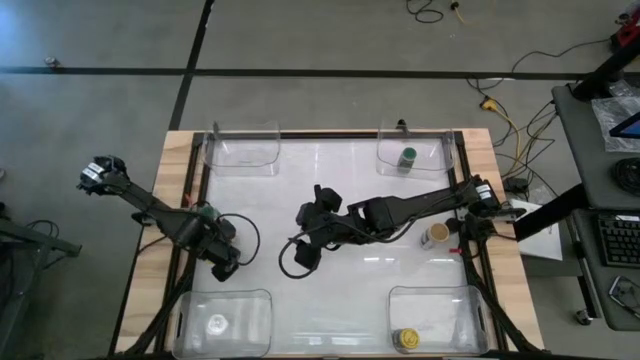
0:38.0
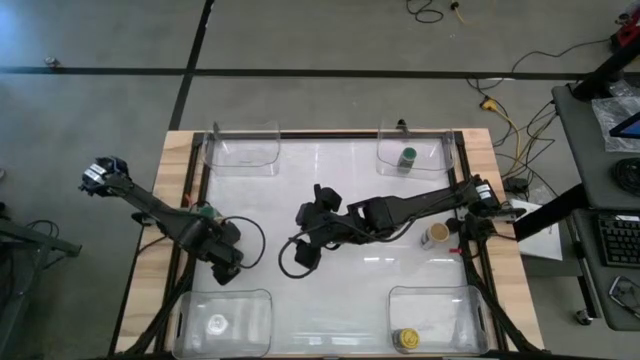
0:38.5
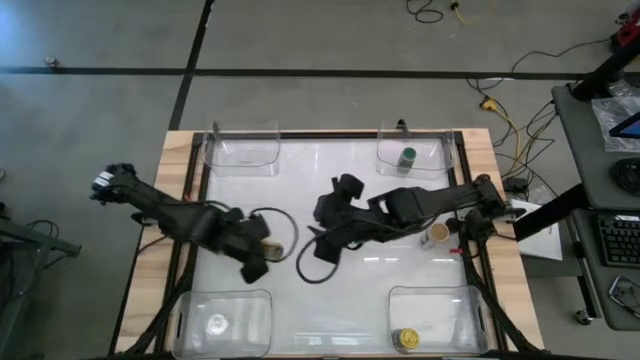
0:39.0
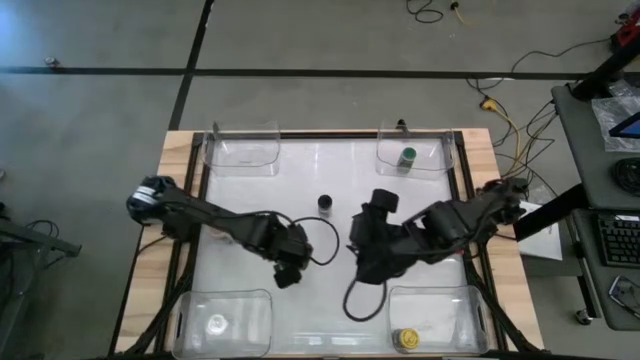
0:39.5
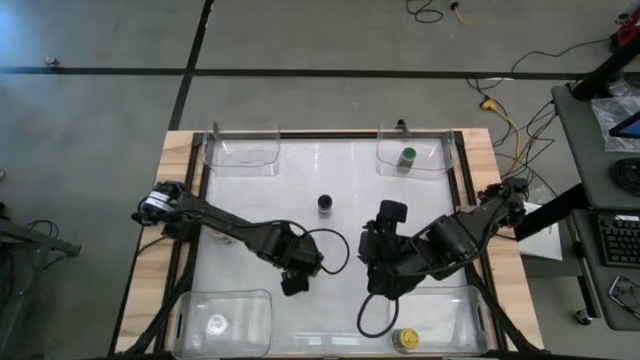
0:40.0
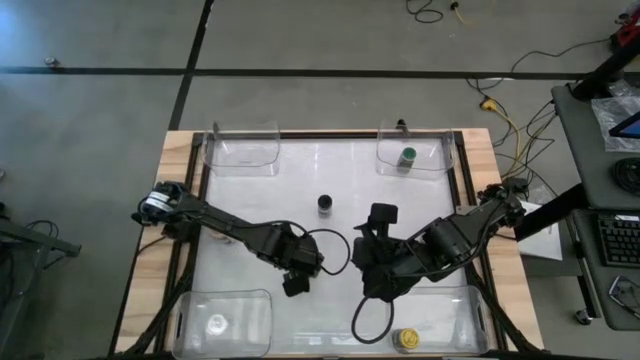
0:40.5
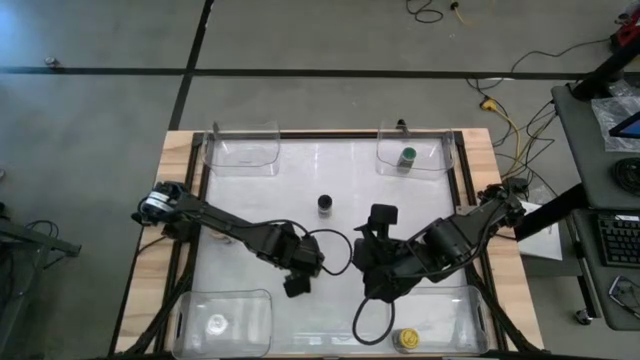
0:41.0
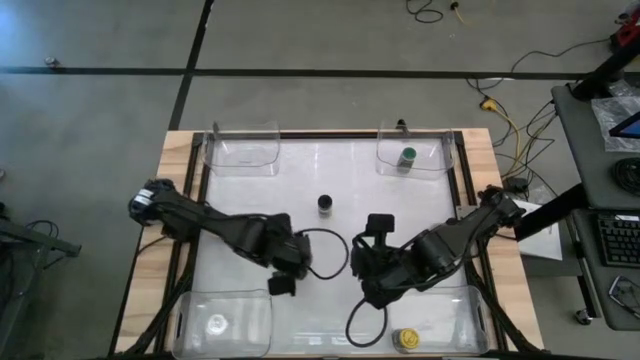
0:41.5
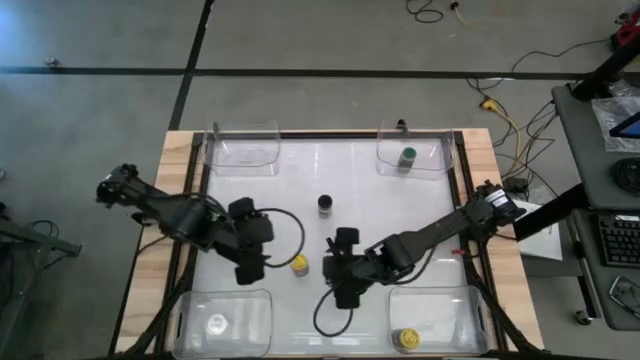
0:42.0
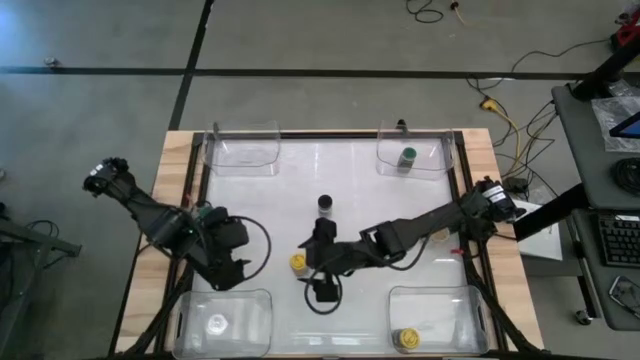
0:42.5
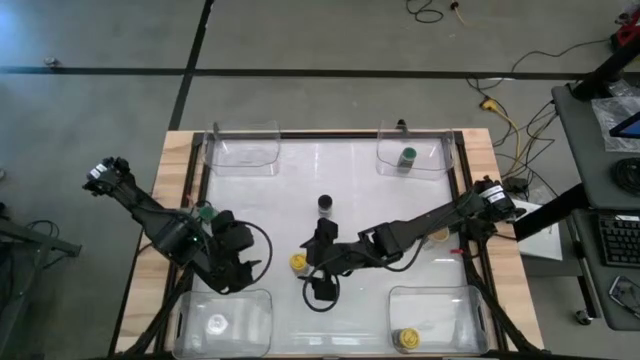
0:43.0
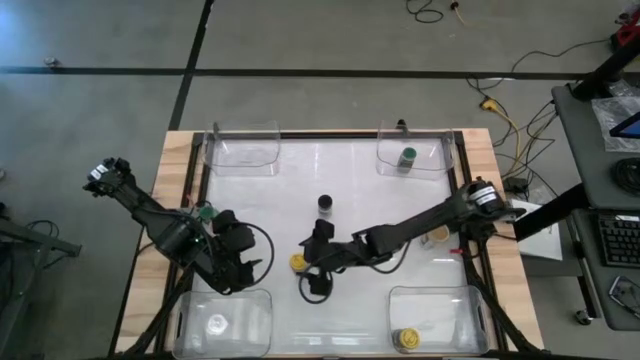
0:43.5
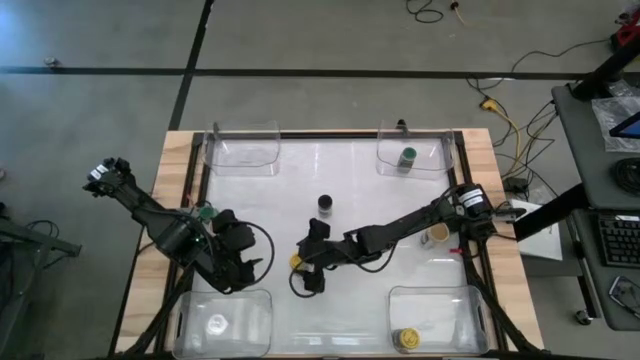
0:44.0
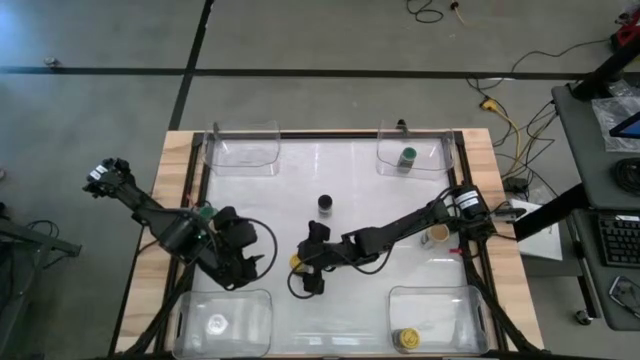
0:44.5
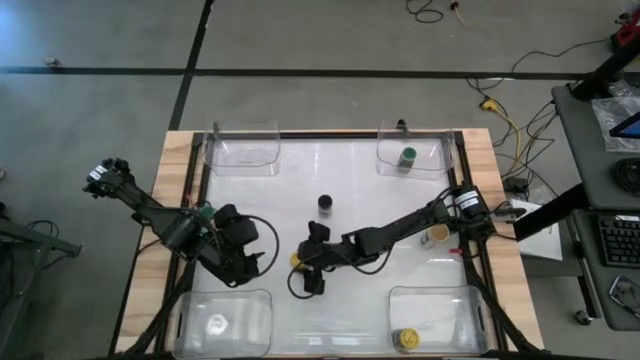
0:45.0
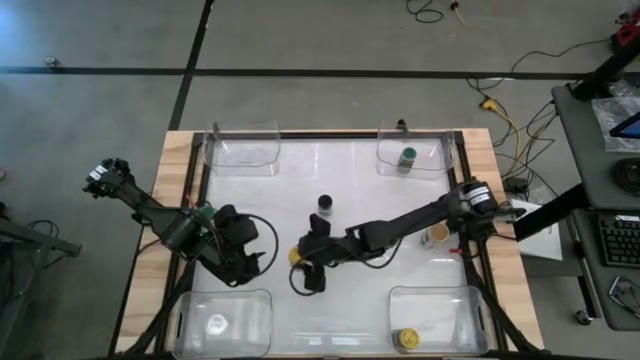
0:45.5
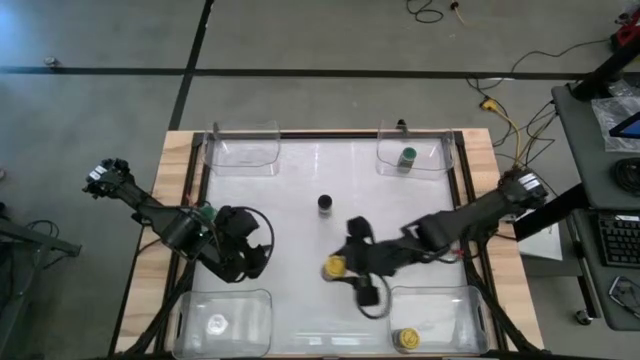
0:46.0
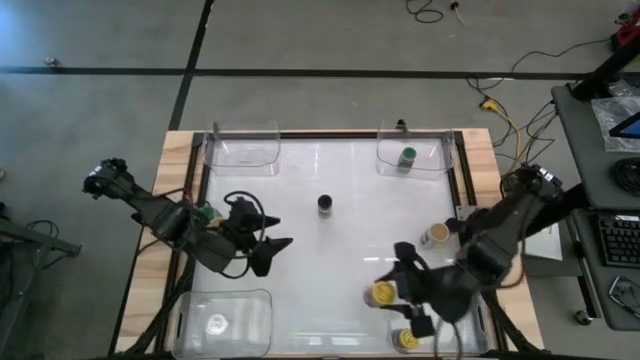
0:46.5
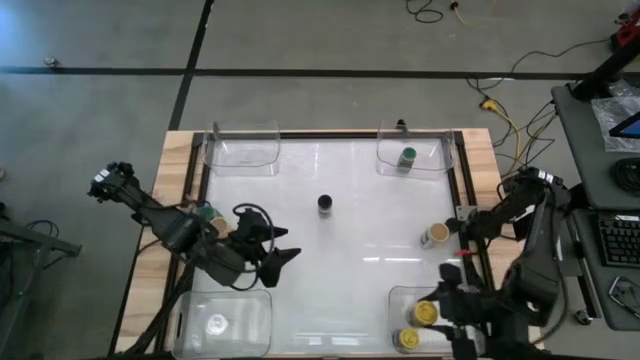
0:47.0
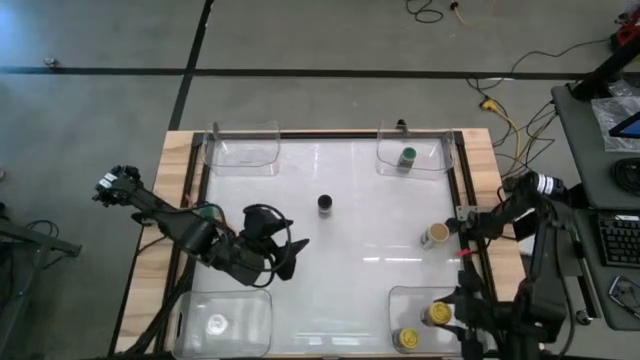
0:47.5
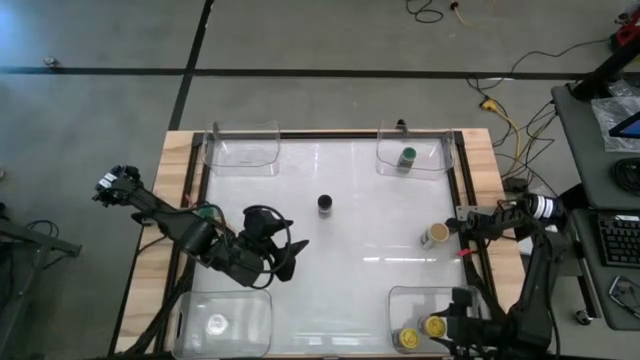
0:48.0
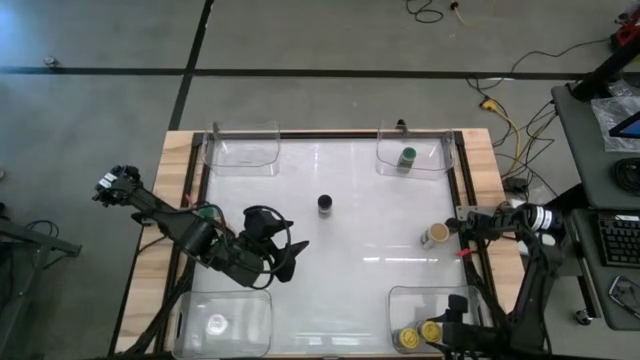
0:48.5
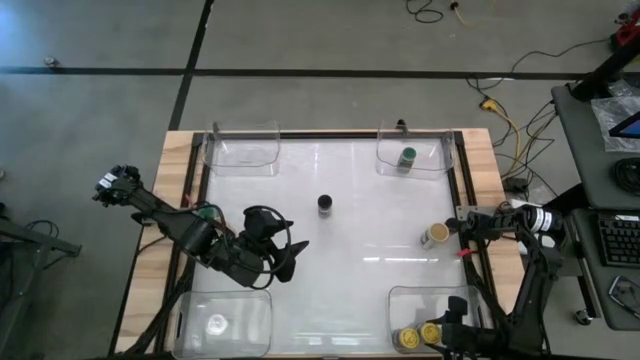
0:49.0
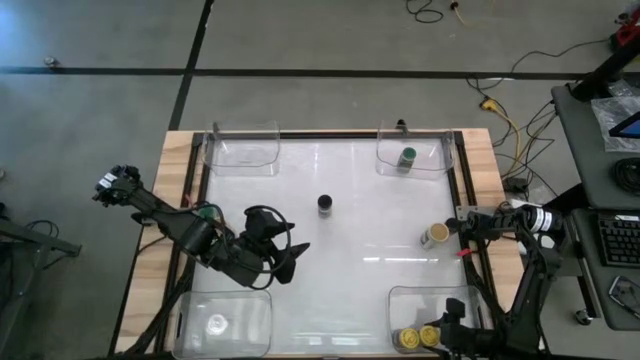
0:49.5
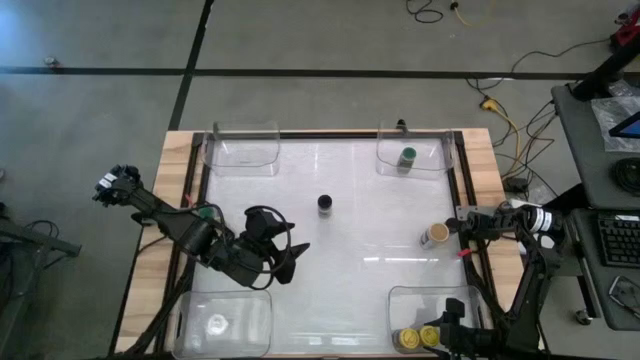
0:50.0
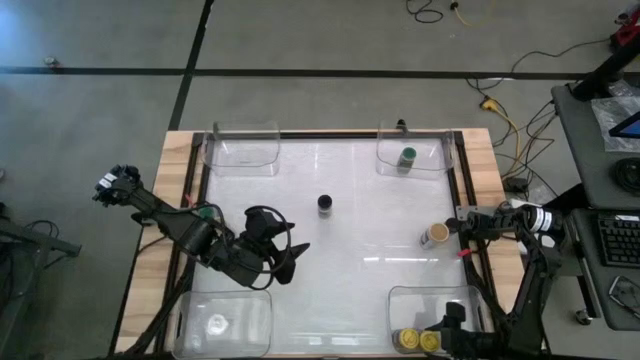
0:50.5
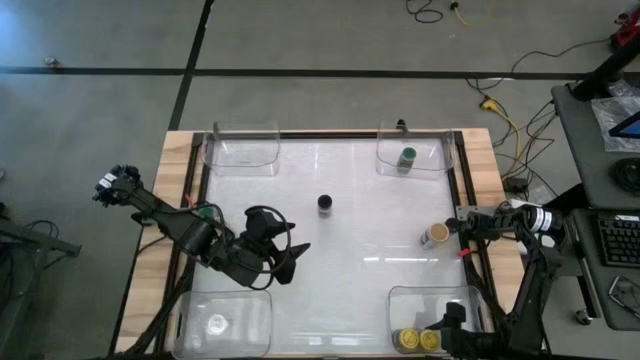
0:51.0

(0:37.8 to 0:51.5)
Task: Sort spices by type
Put the yellow seasoning bottle into the bottom right transparent bin

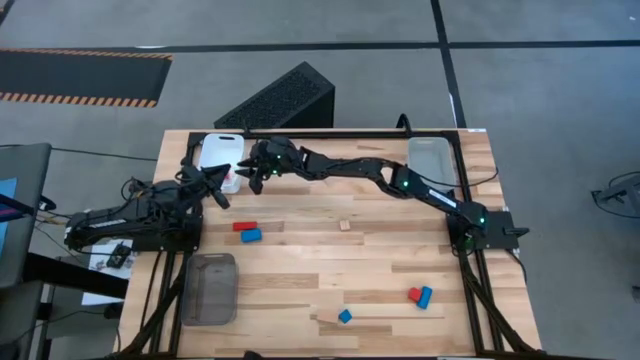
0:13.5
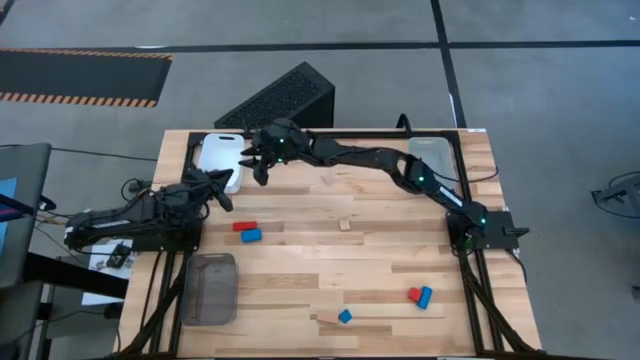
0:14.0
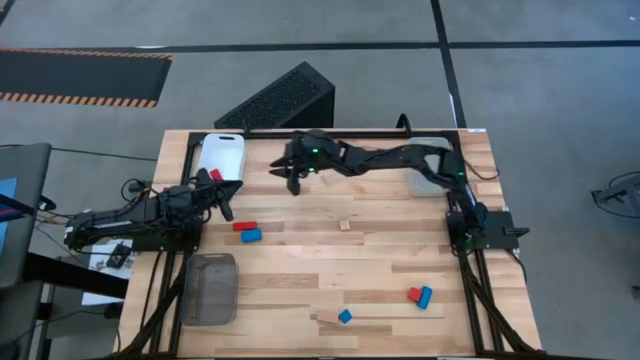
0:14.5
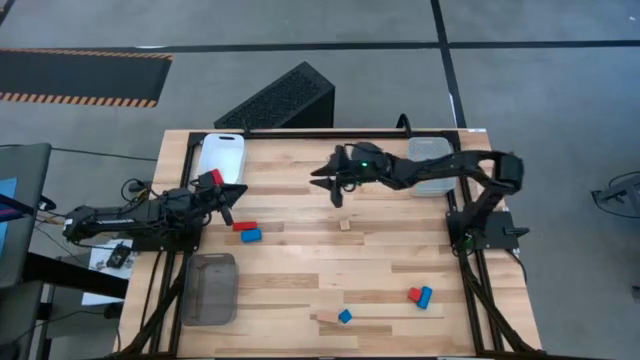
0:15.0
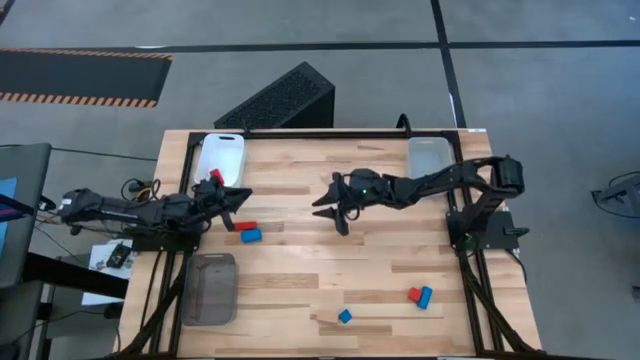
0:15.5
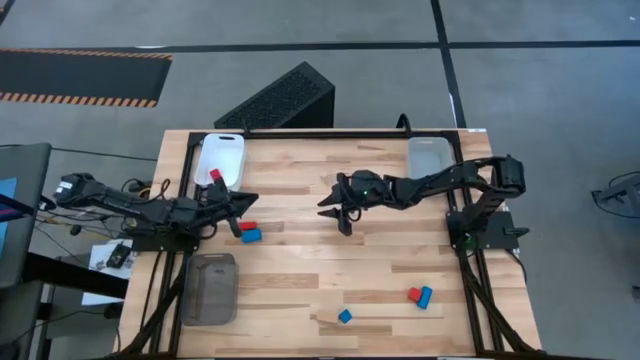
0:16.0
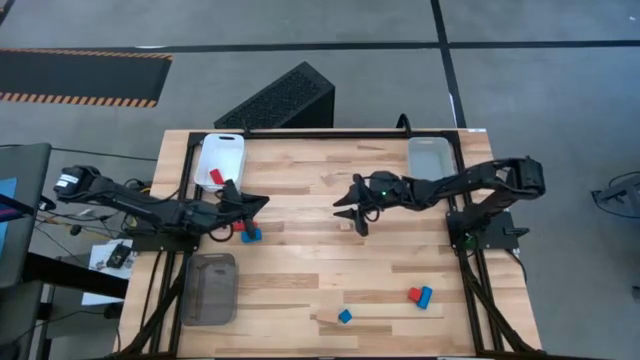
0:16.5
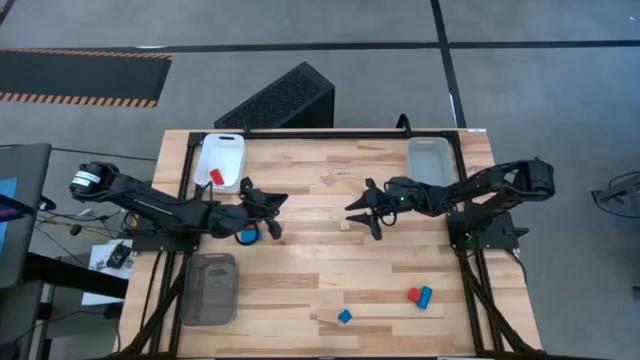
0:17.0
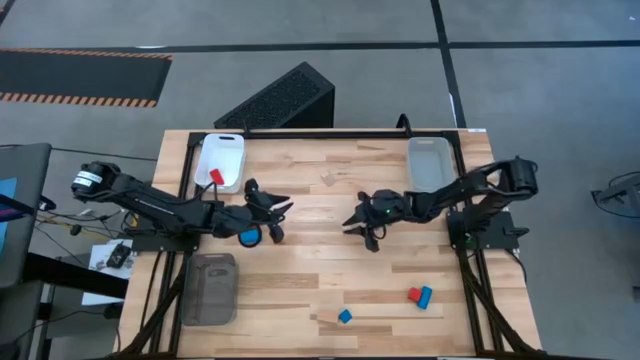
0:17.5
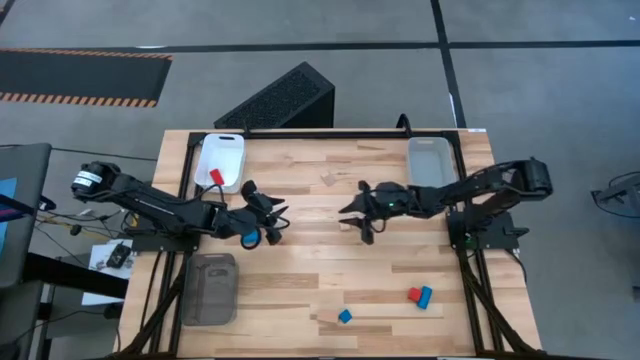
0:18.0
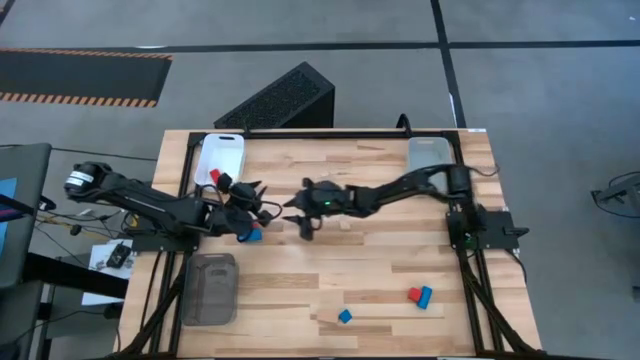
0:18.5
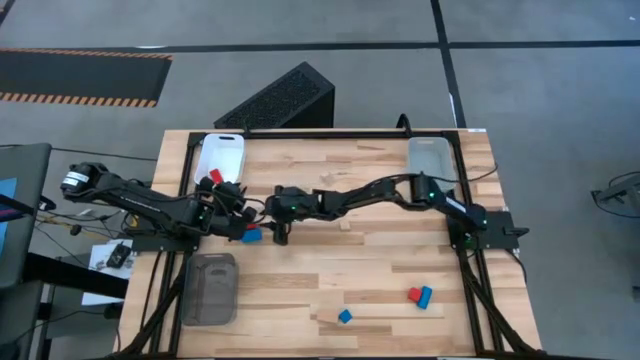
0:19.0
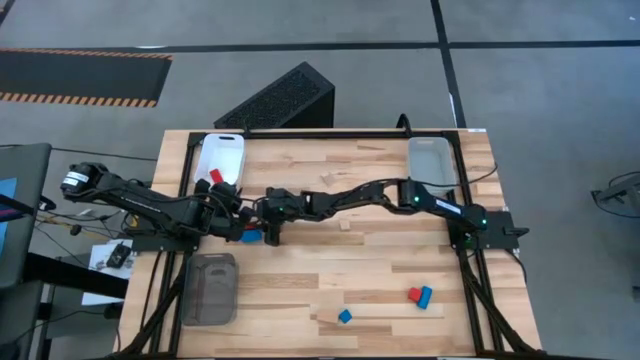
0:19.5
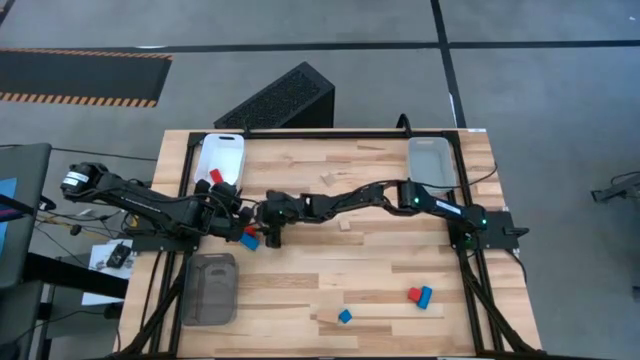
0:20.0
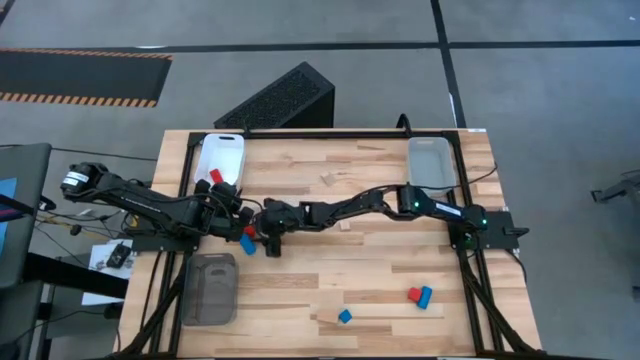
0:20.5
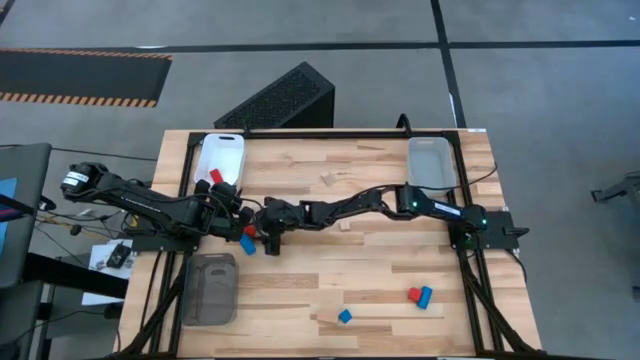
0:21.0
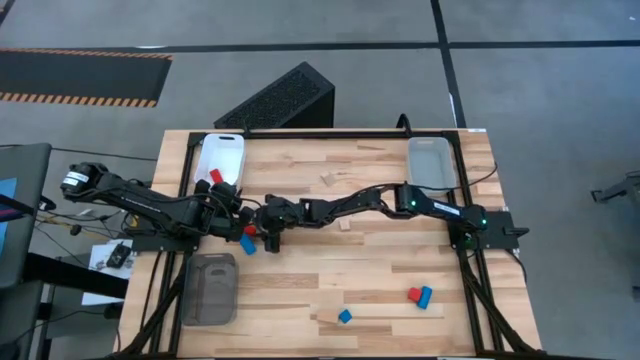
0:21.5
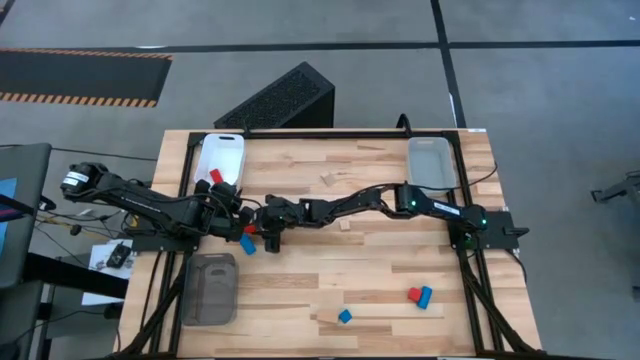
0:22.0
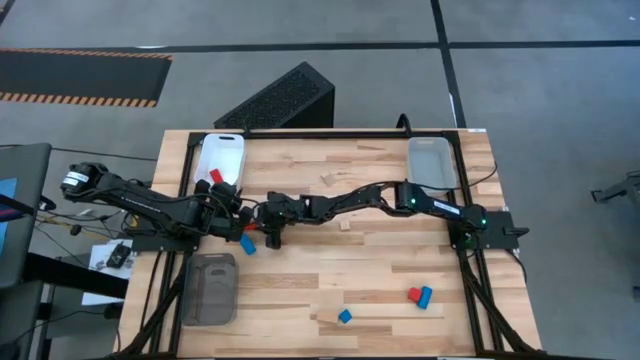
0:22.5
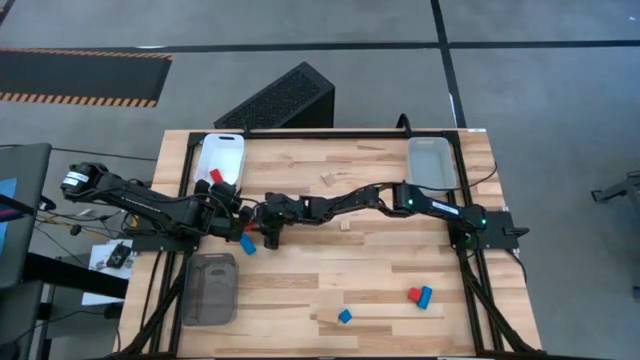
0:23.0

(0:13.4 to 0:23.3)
Task: Sort & place blocks by color
Put the top red block into the white bin
